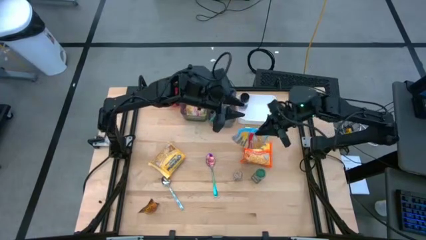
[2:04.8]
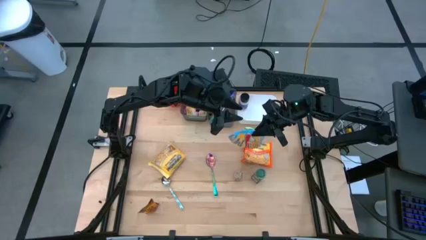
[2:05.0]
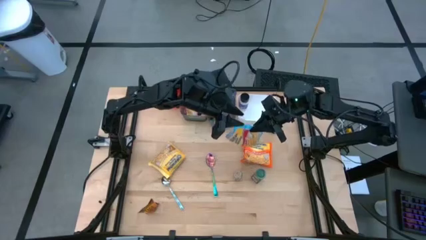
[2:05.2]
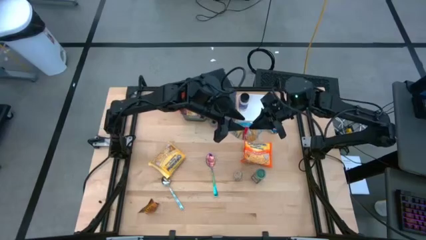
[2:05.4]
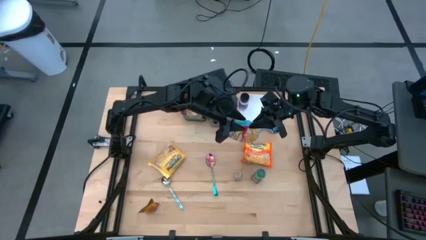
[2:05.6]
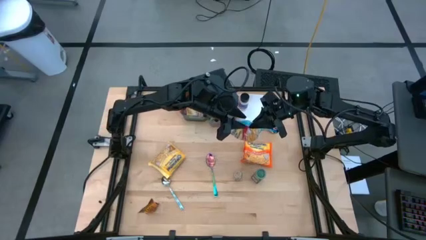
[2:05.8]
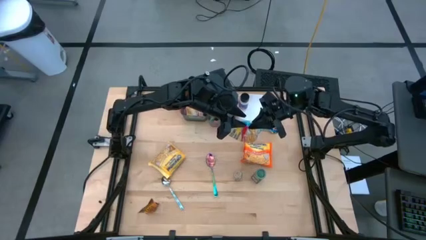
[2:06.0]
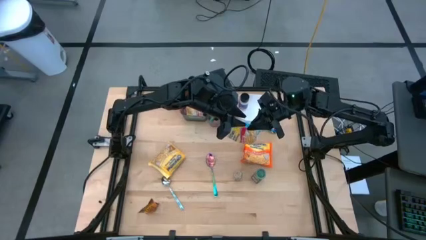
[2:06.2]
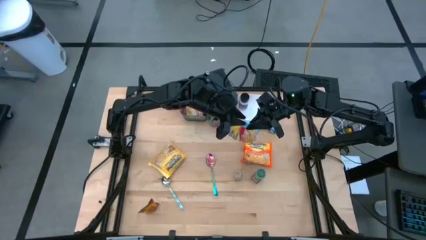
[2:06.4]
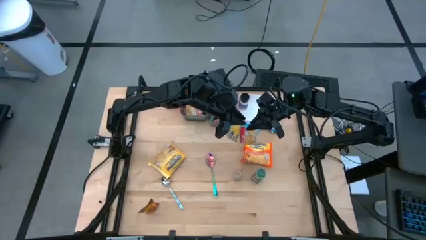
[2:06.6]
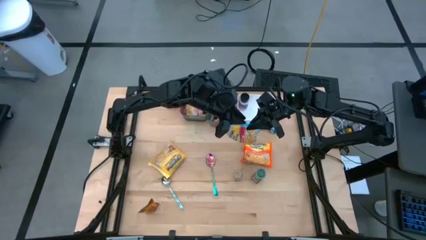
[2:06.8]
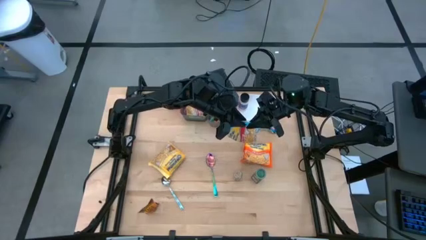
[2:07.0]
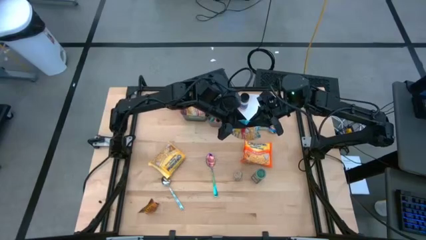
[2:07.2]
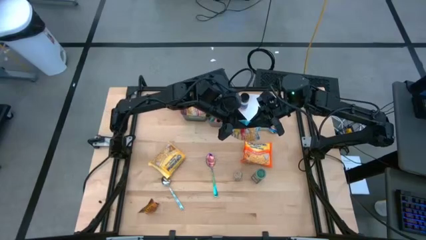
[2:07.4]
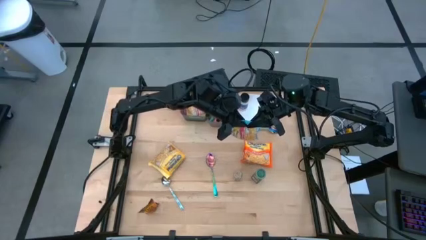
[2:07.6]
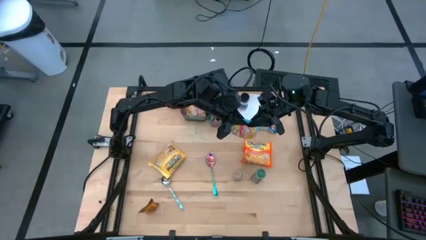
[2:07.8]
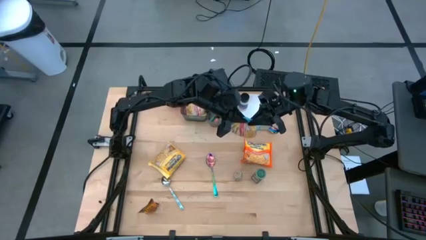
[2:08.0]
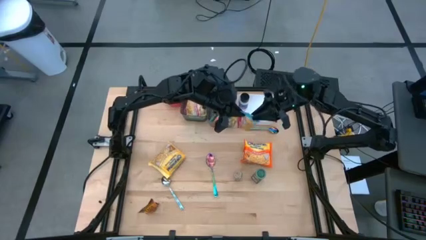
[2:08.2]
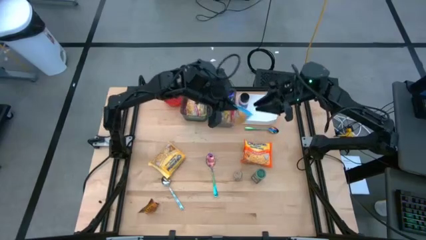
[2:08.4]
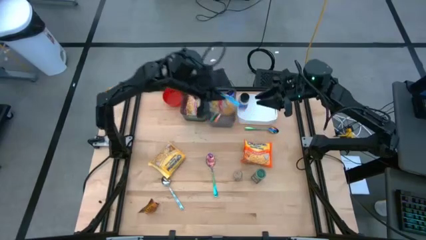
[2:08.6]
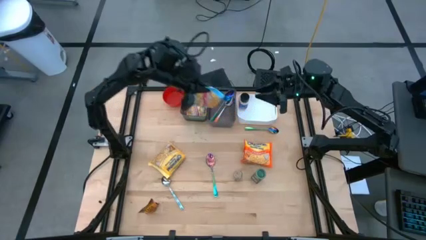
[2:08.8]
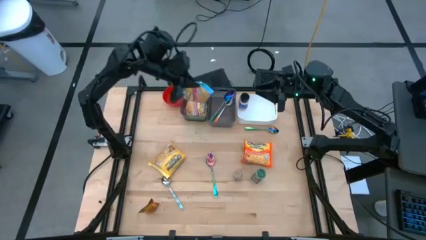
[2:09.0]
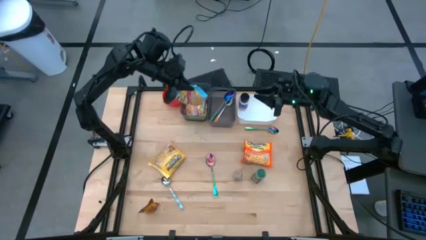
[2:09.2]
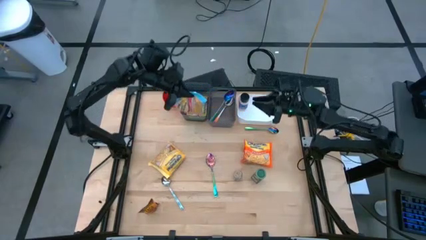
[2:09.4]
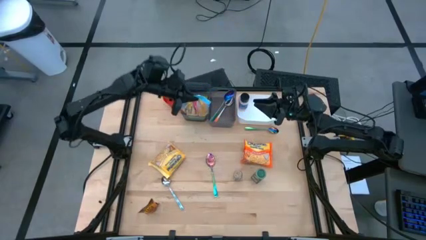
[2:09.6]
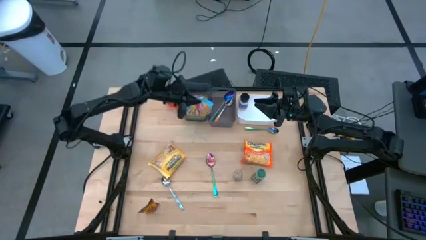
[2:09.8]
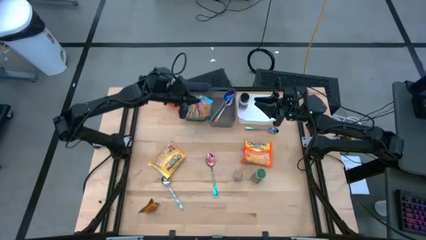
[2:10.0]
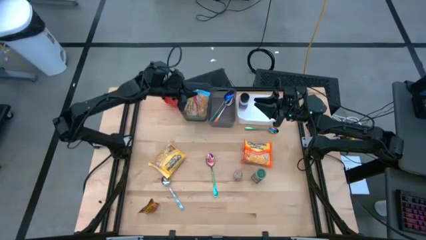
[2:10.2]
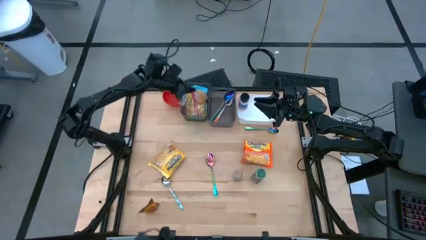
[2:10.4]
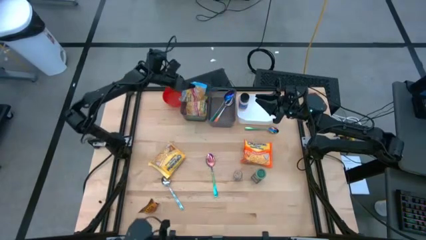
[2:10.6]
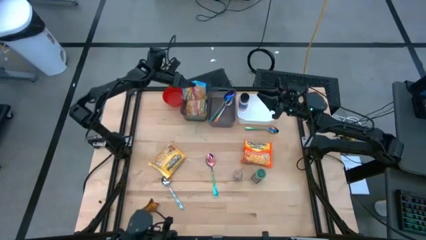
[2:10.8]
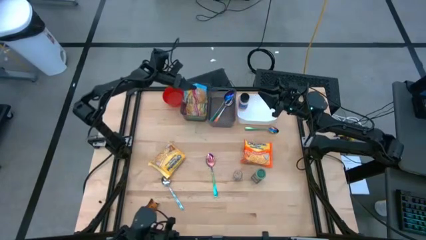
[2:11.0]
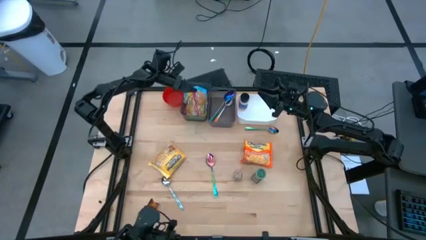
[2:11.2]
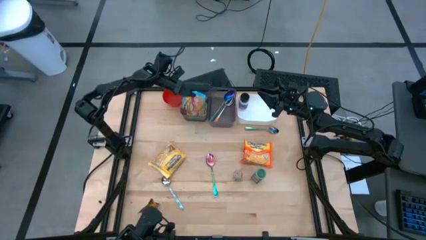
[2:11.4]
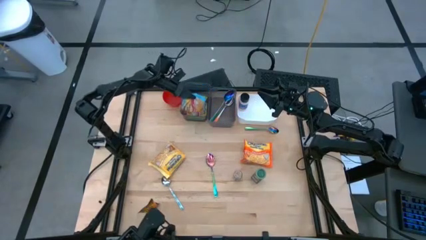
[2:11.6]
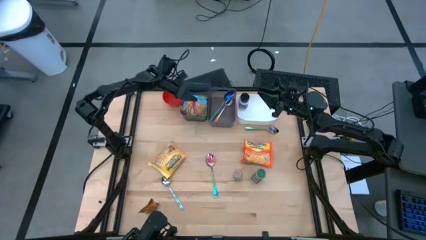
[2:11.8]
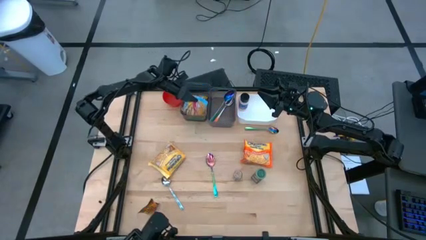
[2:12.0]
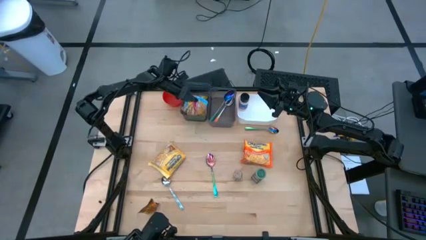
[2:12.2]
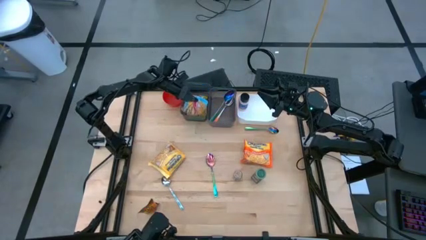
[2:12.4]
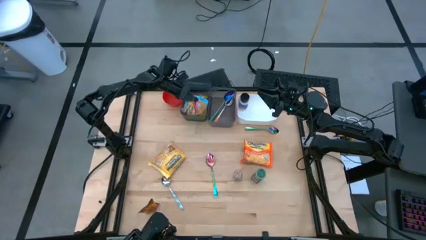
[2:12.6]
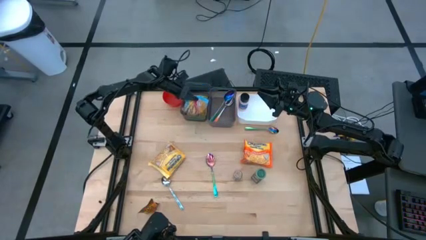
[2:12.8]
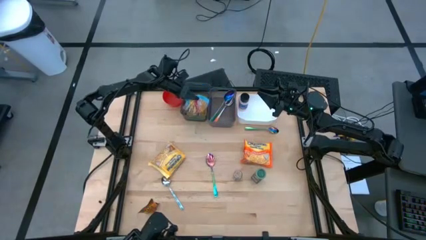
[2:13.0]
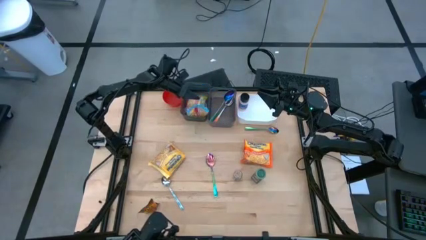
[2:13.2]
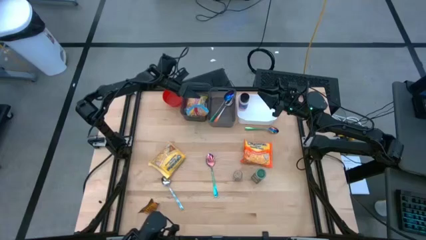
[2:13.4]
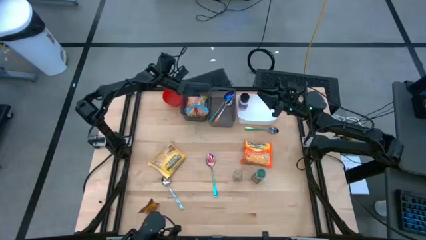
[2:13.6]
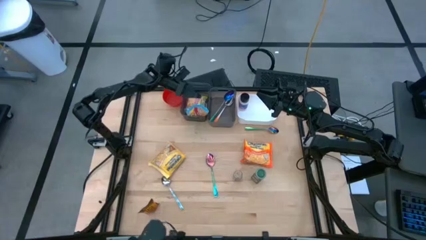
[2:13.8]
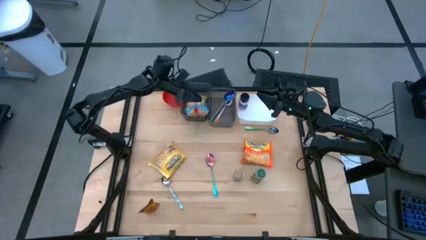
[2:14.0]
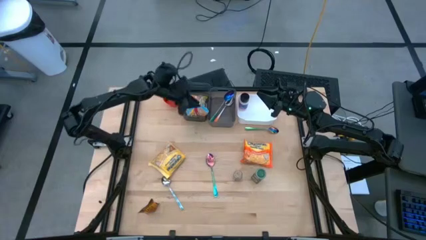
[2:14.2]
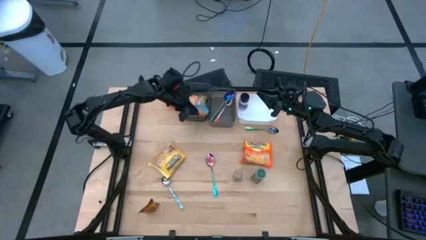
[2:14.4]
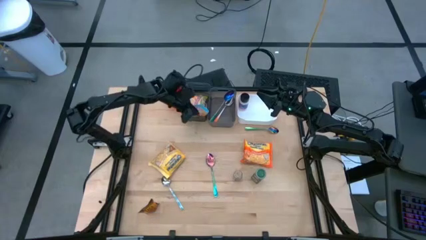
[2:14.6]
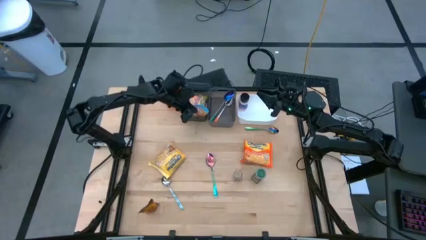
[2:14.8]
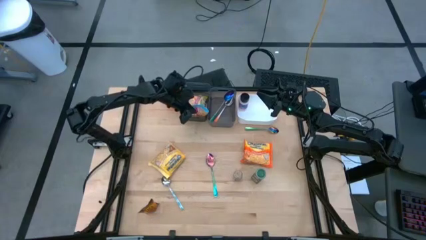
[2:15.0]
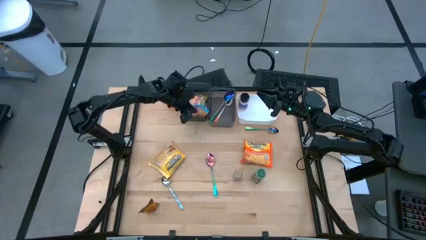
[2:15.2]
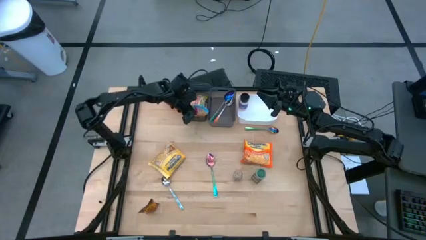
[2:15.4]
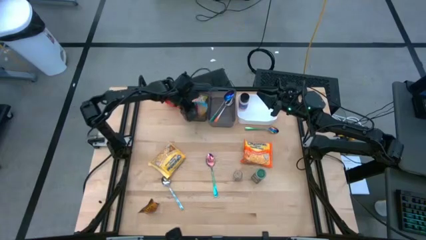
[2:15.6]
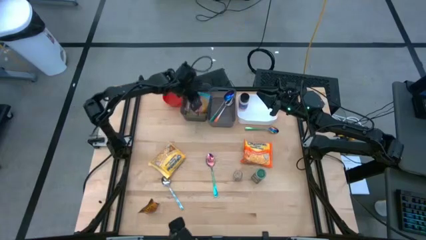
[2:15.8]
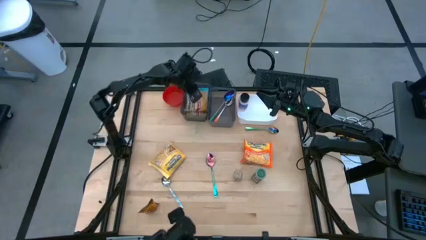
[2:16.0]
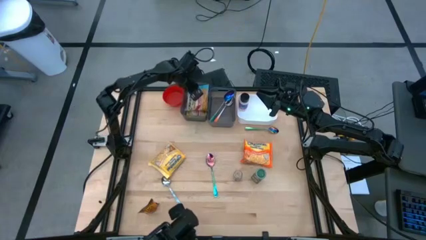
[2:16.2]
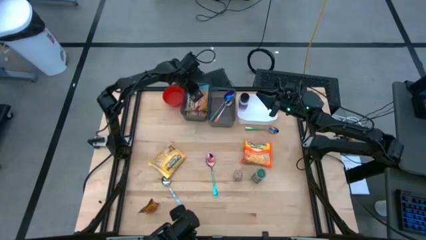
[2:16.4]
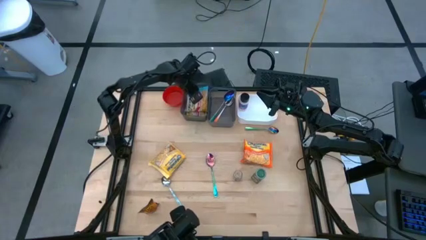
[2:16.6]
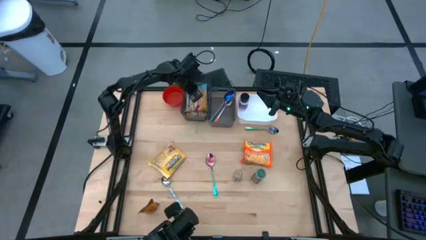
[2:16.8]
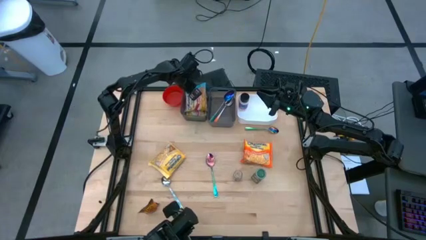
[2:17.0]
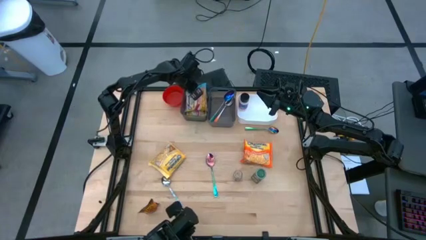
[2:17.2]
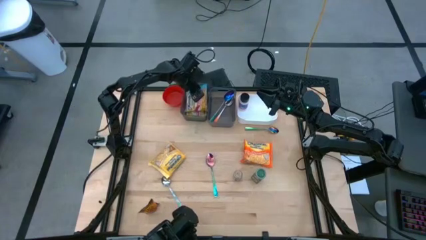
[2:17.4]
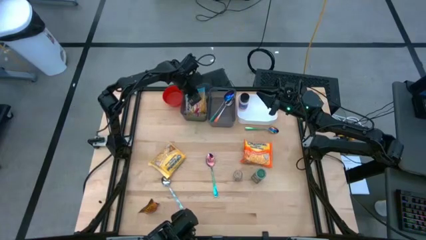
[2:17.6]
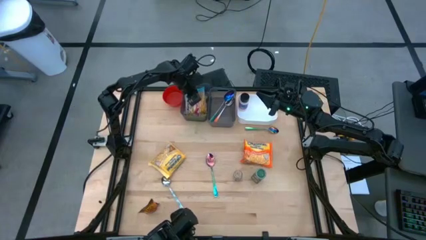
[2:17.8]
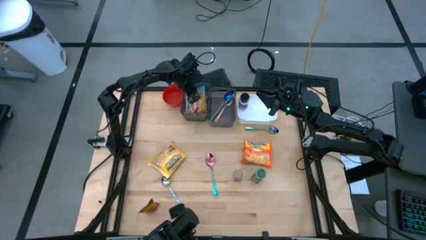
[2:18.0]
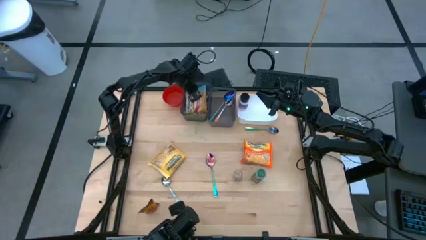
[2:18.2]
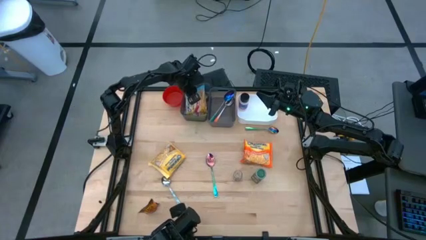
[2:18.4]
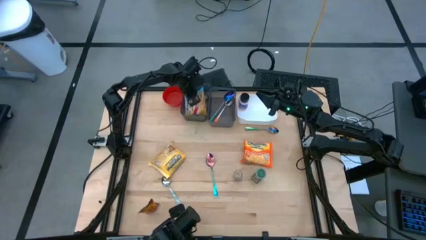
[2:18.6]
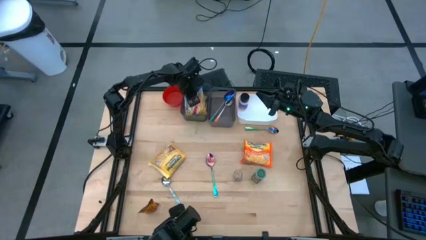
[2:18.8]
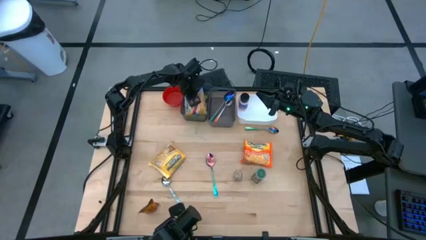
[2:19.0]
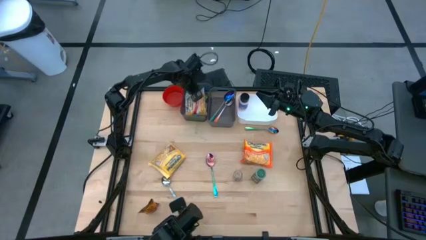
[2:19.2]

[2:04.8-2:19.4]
Task: Pick & Place Food Item
Put the blue noodle pack into the left black bin

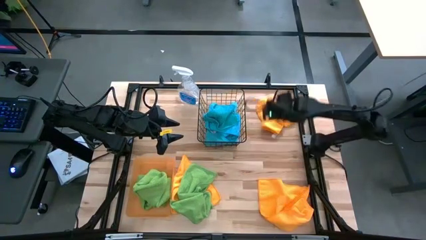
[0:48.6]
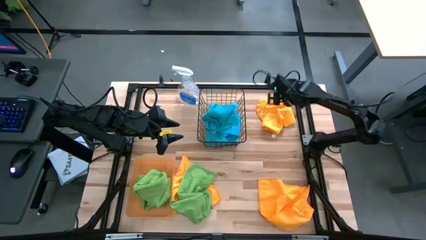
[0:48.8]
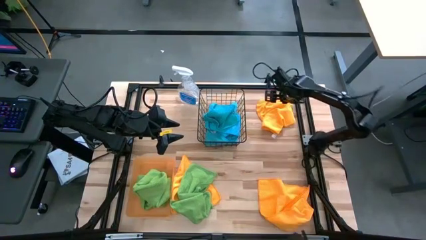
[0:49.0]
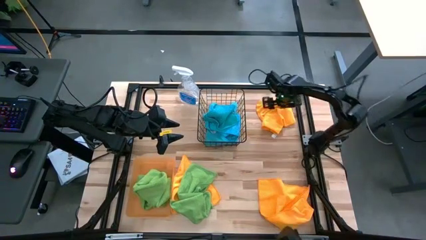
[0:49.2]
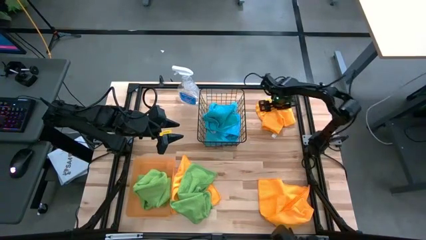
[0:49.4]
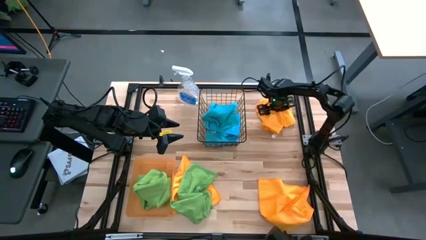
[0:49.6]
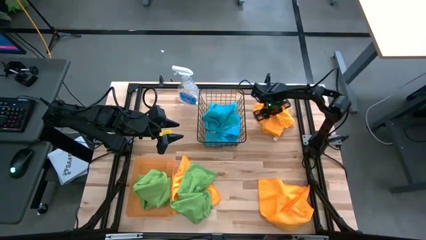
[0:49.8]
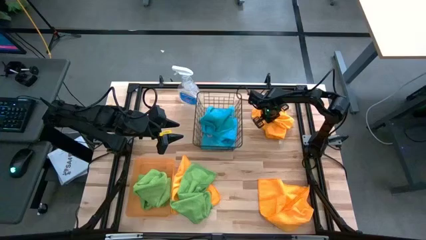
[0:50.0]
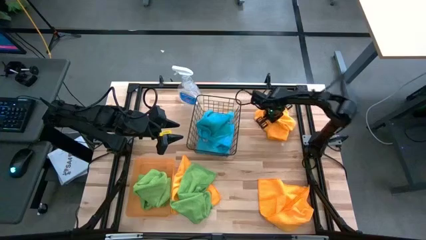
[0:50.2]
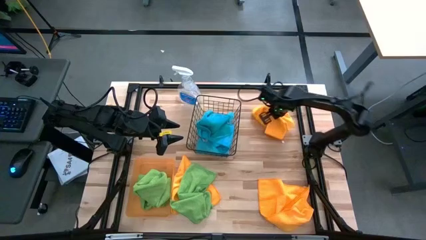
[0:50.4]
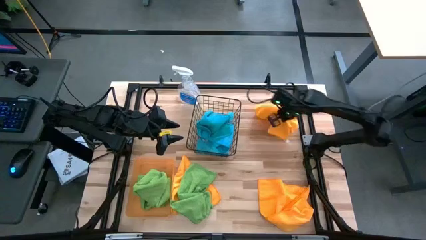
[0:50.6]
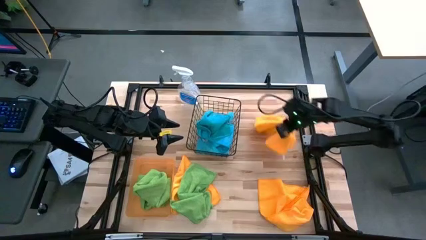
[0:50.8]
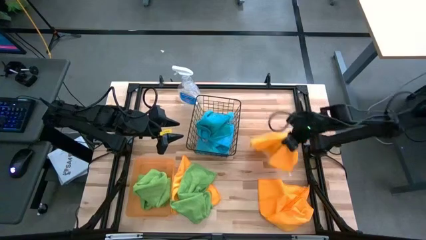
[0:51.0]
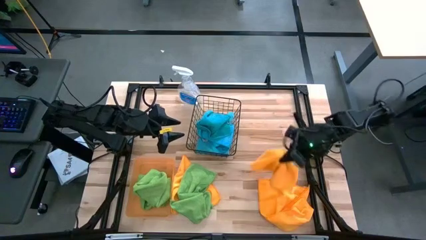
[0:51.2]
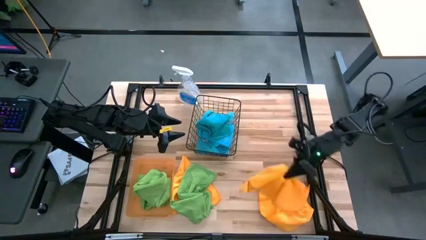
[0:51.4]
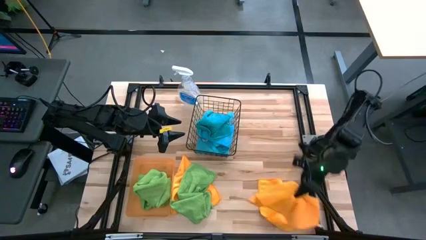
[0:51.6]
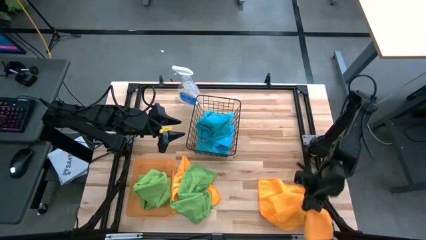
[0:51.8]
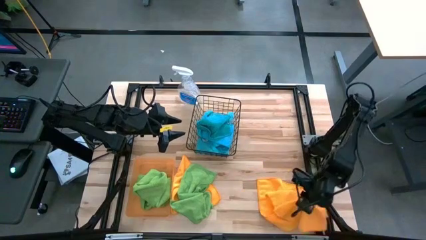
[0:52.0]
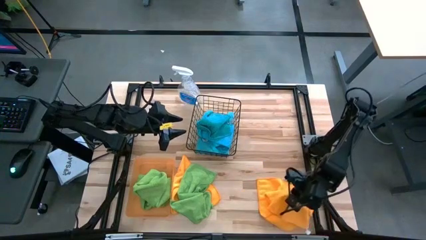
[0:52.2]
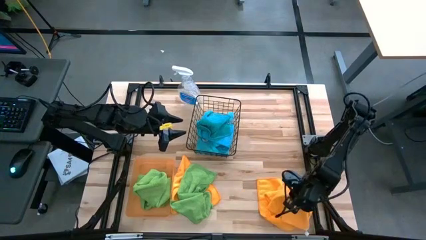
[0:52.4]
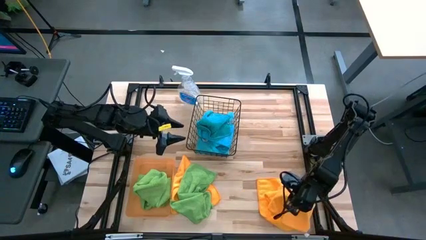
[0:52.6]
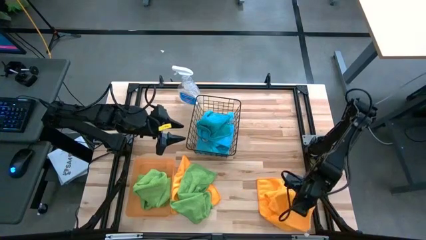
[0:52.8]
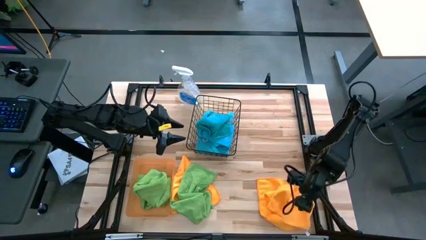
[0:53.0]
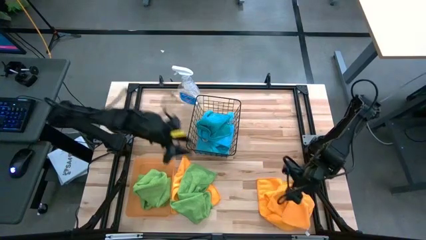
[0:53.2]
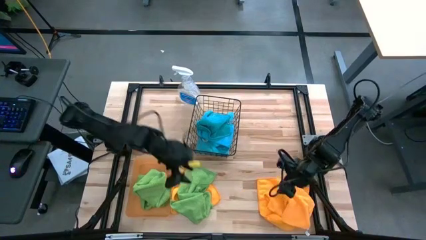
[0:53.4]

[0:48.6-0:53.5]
Task: Sort microfiber towel by color & place in baskets
Stack the top orange towel on the bottom right orange towel
